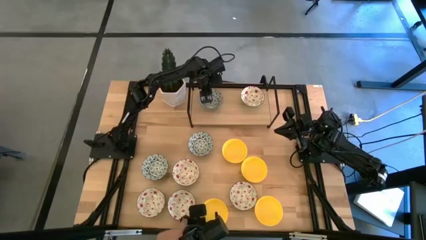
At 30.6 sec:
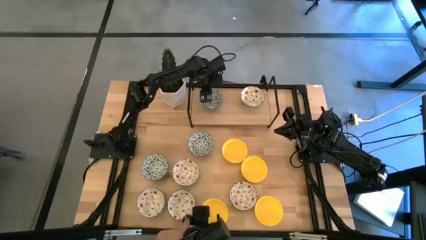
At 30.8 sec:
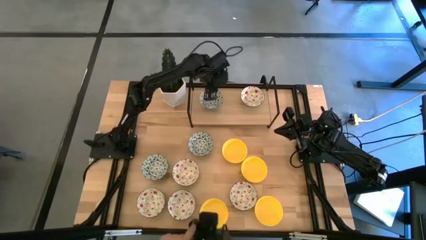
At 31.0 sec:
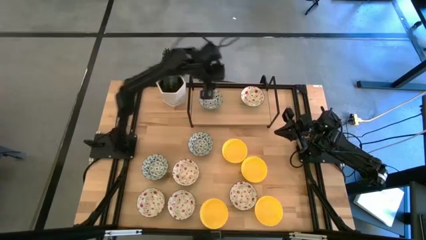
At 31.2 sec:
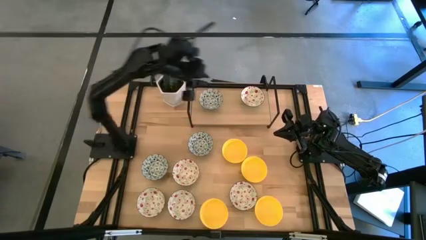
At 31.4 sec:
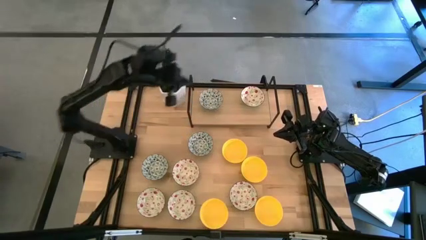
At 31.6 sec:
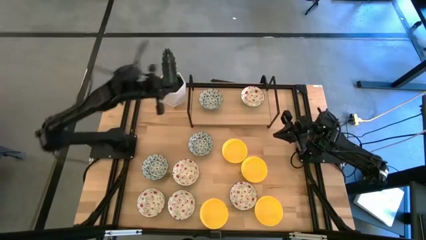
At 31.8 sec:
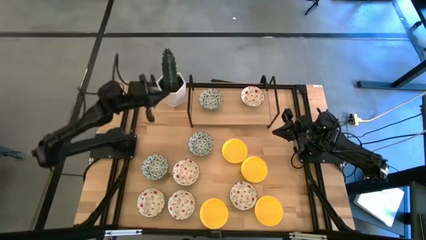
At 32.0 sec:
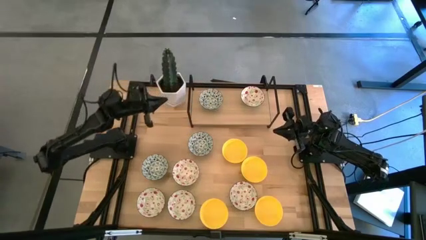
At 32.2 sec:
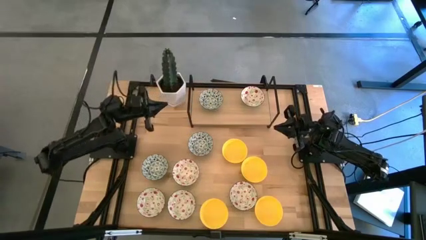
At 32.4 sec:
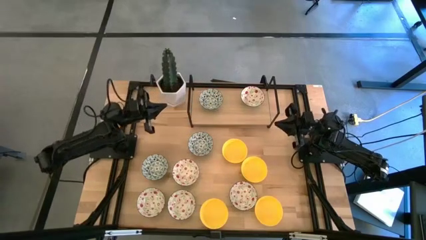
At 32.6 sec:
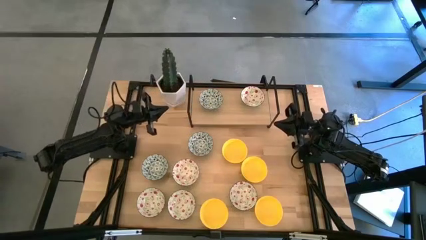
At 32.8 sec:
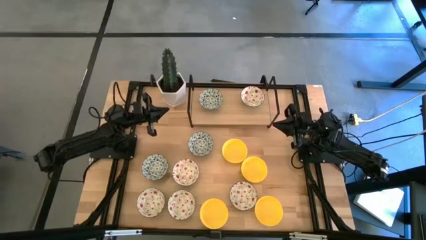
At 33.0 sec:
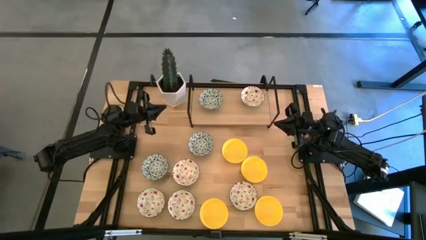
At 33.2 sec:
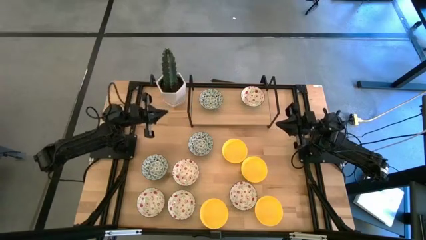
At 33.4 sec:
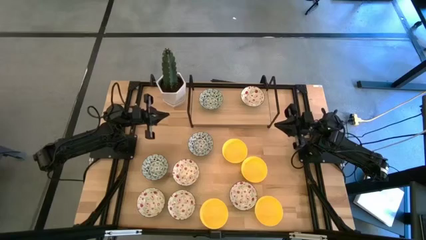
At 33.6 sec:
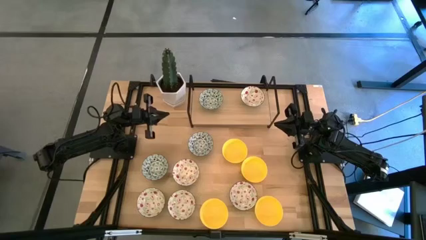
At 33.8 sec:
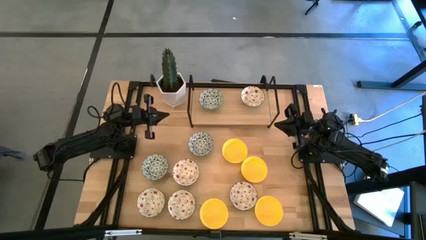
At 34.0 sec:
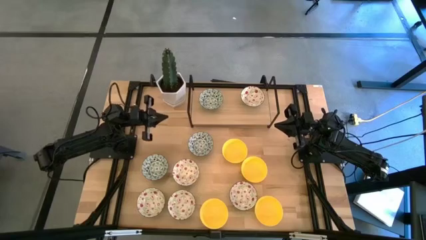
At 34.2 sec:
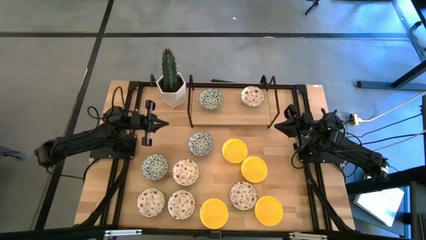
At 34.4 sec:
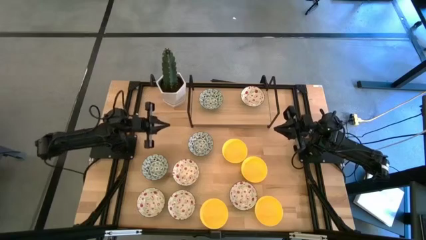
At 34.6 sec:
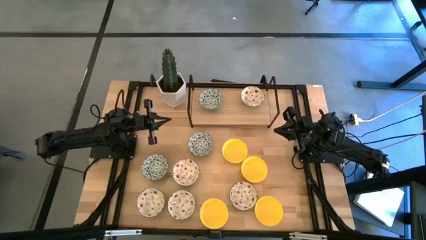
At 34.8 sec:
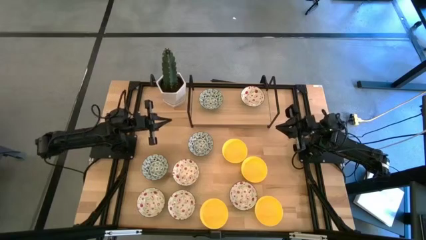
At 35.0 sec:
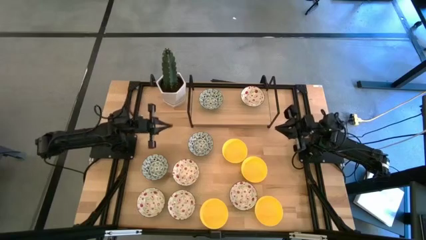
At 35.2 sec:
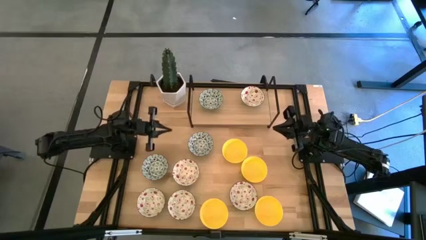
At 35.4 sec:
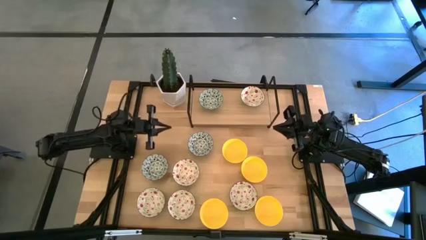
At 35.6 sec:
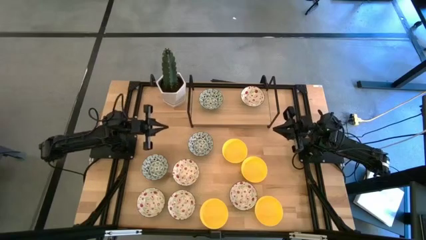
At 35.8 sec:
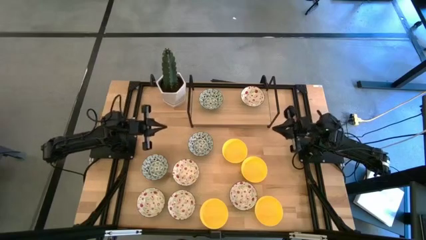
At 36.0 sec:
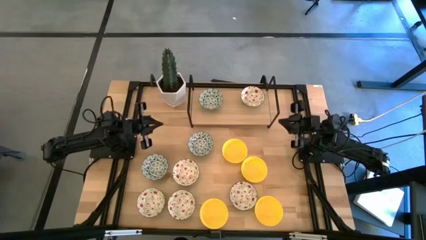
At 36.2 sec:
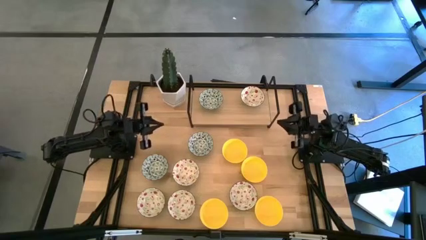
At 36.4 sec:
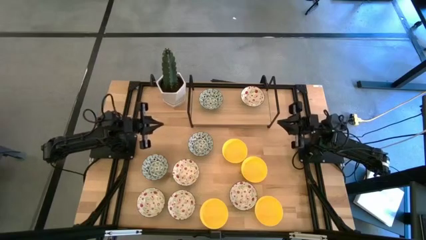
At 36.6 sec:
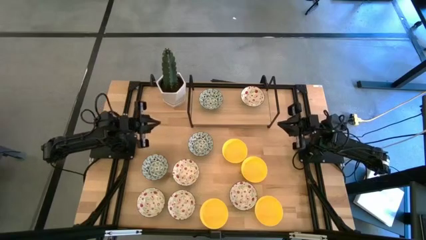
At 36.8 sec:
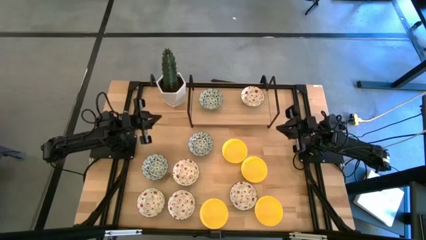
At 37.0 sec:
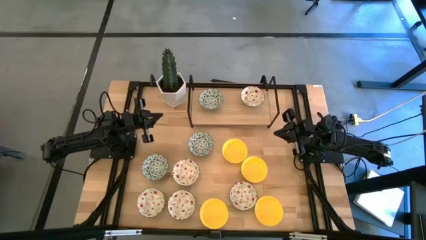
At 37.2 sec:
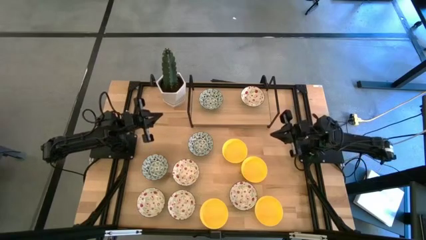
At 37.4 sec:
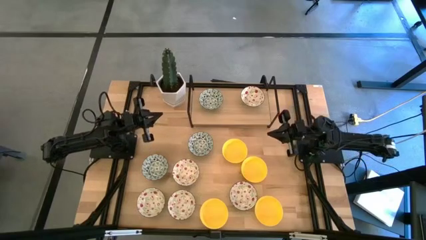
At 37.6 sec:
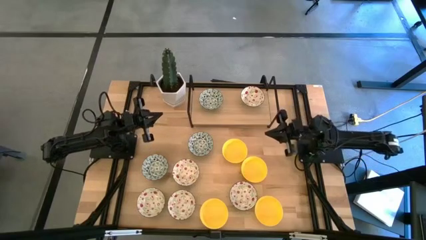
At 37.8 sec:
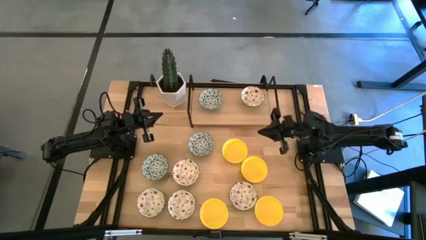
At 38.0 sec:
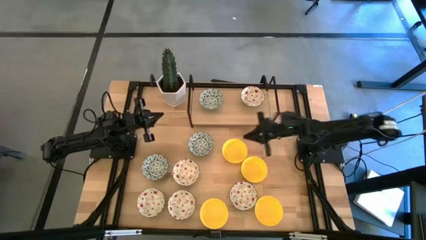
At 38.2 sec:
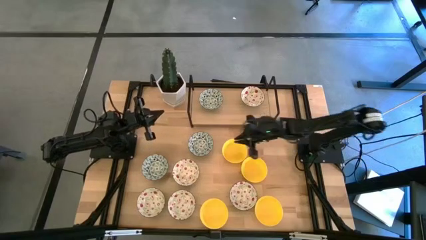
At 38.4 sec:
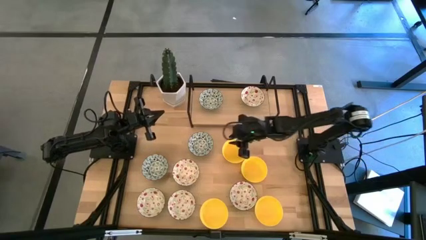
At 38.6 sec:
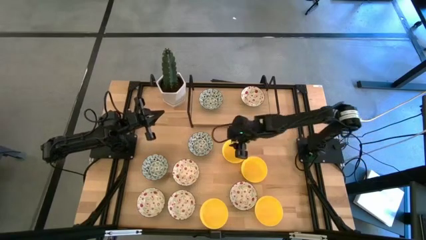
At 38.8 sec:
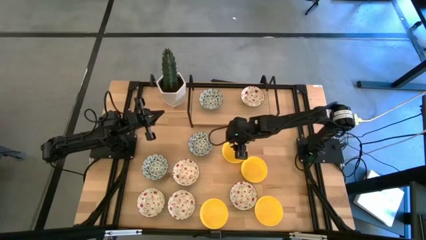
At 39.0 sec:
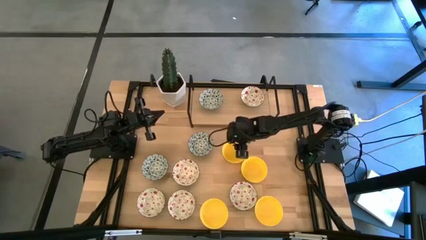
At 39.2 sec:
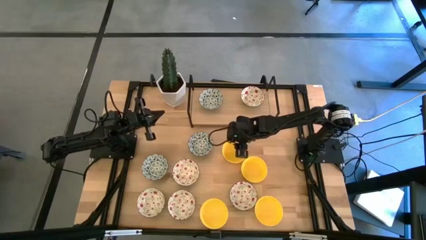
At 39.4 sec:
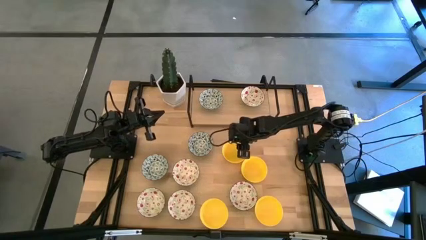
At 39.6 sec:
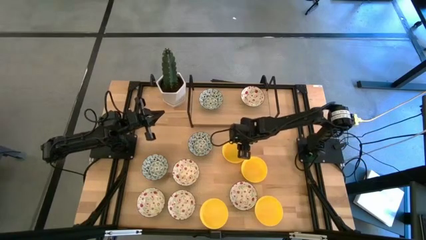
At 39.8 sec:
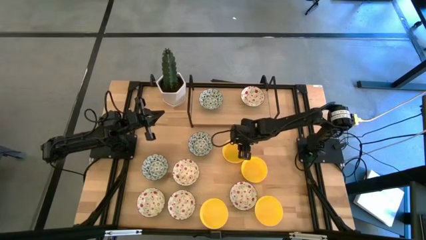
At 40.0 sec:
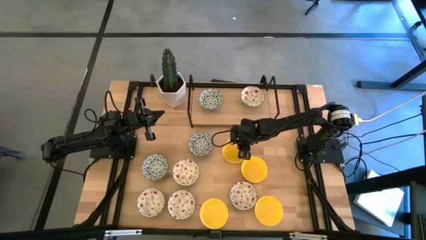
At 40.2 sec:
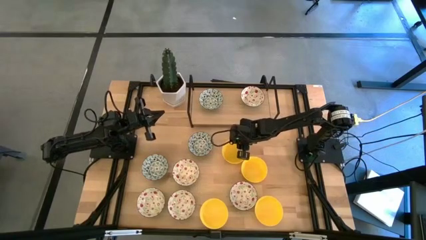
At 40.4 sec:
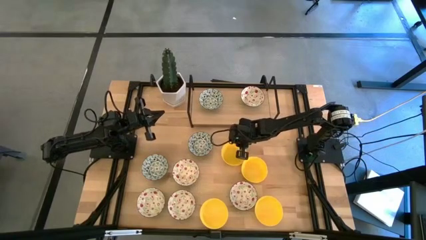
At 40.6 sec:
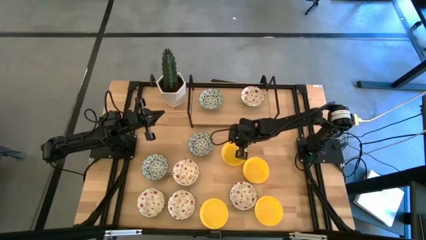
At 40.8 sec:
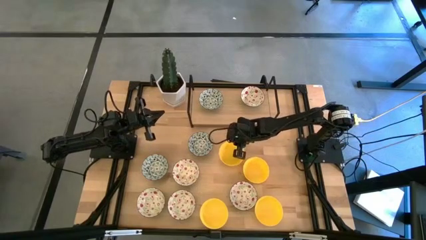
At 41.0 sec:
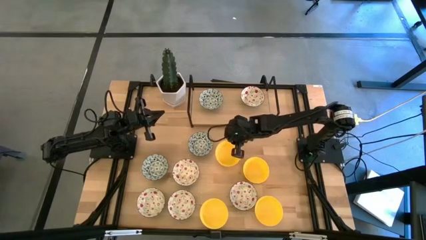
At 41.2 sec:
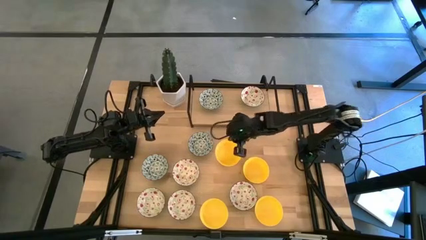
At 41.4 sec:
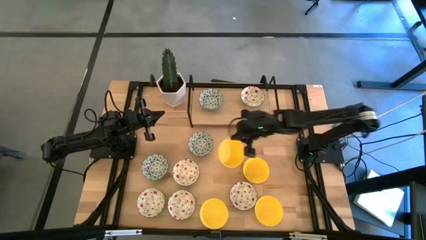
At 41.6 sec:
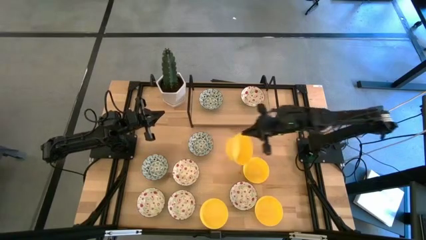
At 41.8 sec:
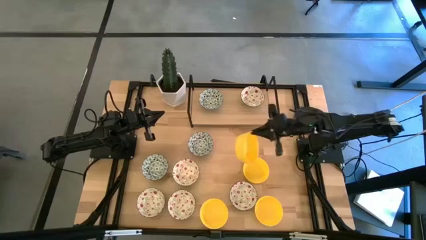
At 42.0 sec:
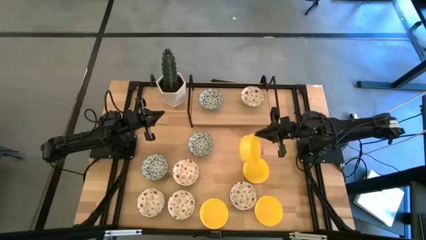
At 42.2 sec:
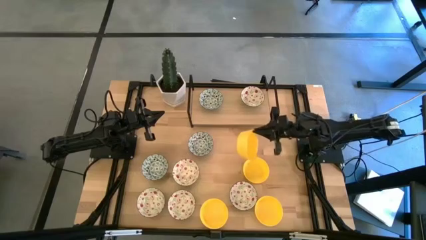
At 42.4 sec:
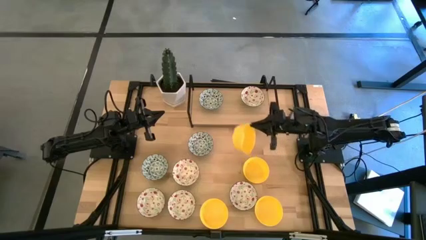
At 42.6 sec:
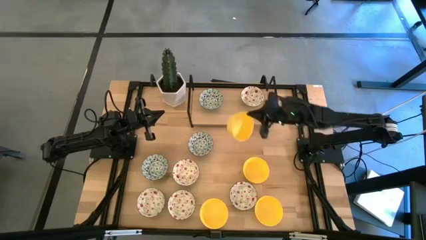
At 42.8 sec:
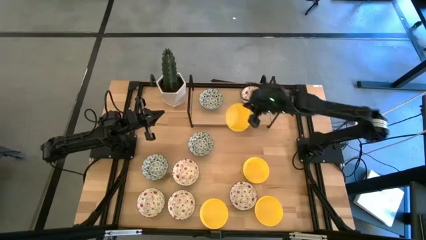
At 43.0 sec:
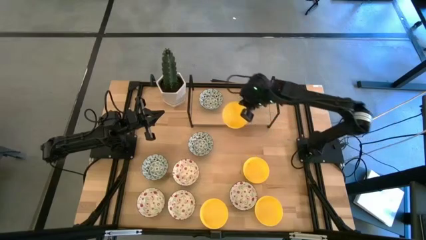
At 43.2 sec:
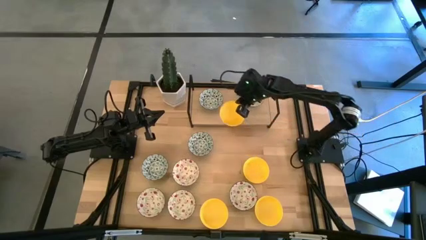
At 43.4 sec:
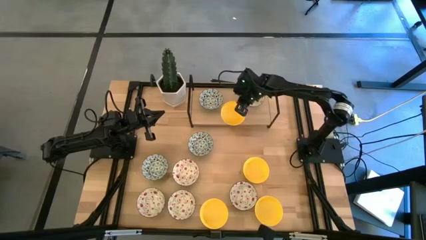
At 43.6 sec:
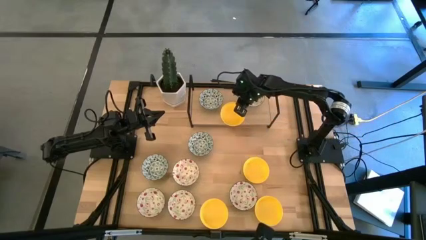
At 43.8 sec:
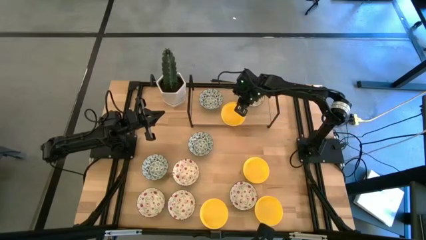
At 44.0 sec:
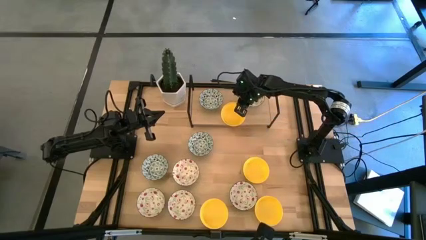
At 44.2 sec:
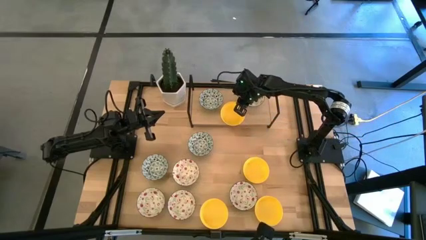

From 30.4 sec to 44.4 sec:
Task: Pick & Place Mini bowls
Put the yellow bowl on the shelf

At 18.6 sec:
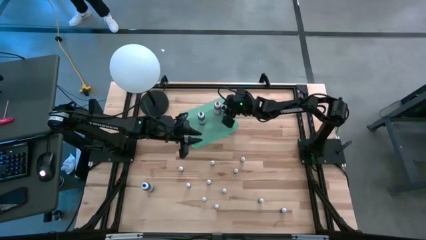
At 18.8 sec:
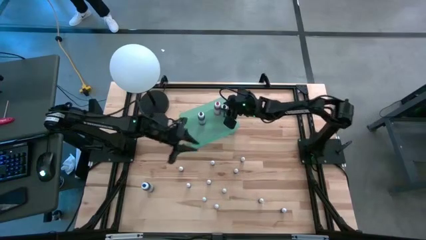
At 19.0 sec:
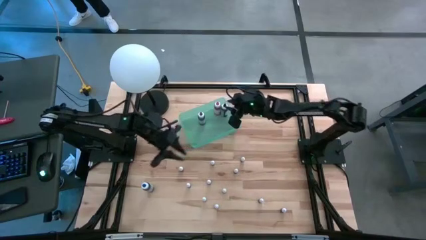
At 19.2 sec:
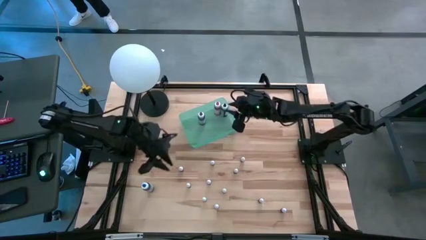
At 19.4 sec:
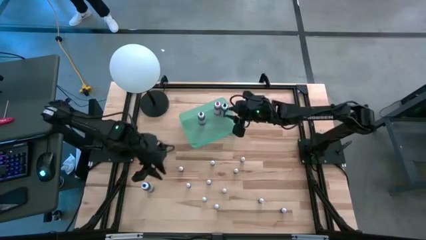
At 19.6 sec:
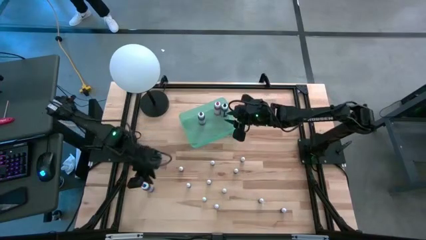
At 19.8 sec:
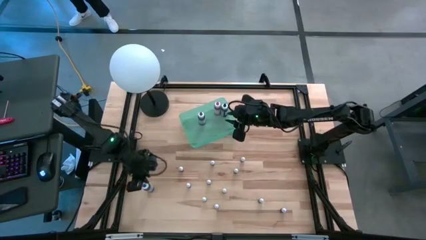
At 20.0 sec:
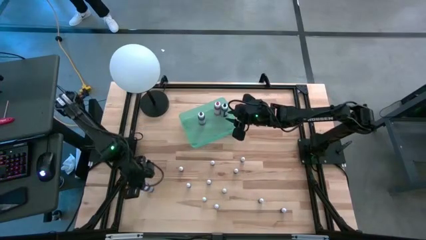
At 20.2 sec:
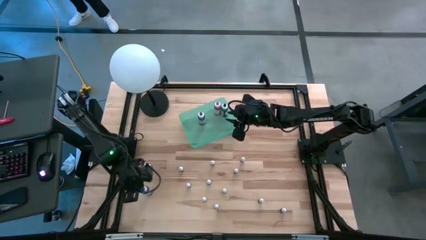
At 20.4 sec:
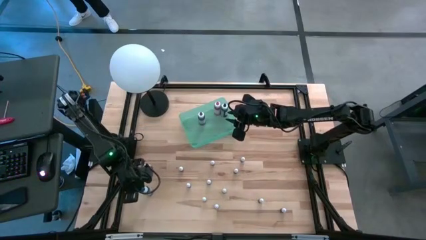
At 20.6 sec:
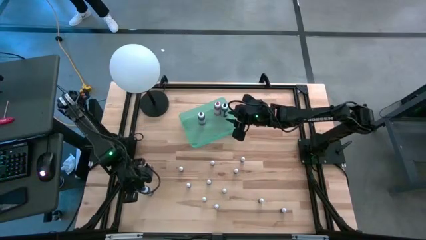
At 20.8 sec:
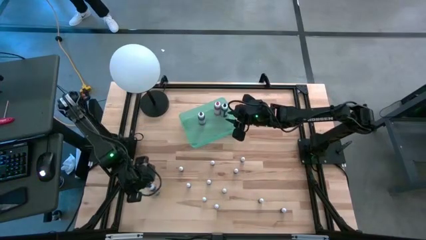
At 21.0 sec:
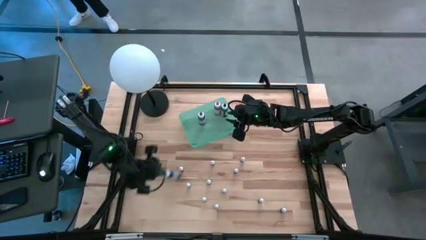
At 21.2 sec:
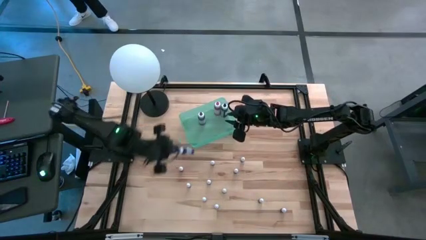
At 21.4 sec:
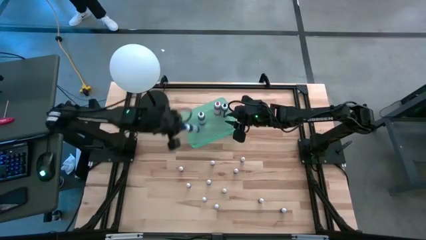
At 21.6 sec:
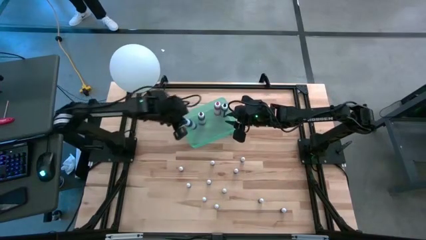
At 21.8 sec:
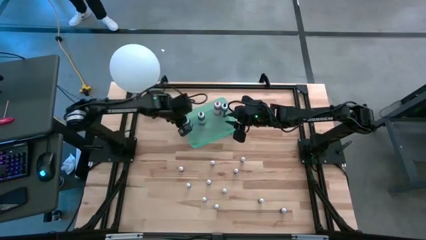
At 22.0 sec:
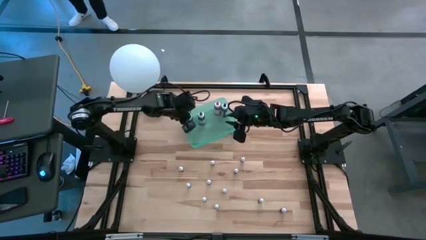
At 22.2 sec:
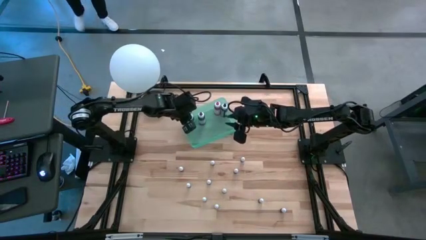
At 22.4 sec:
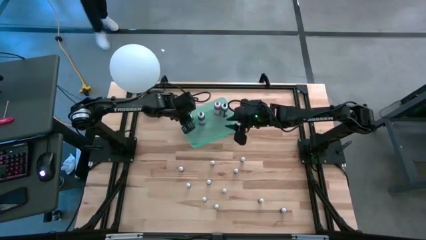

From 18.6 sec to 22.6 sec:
Task: Pick & Place food coloring
Put the large blue bottle into the blue bin
